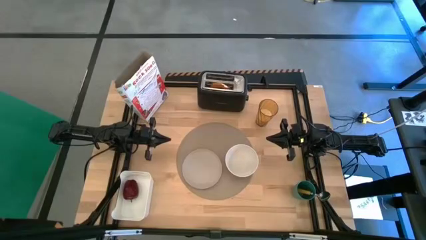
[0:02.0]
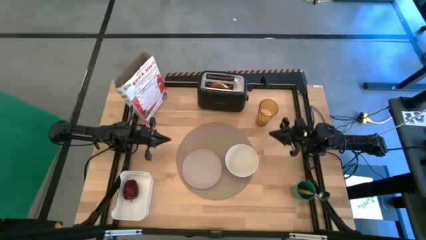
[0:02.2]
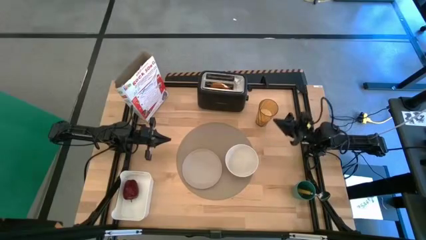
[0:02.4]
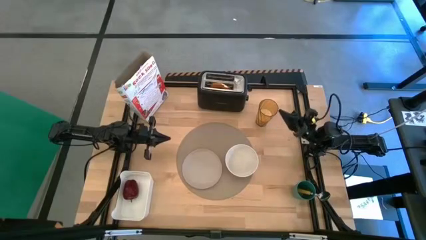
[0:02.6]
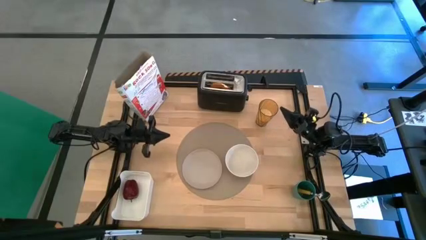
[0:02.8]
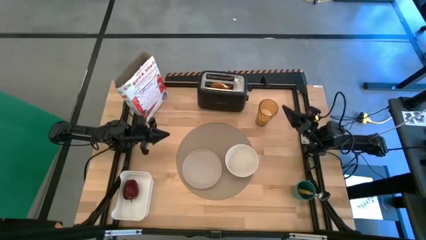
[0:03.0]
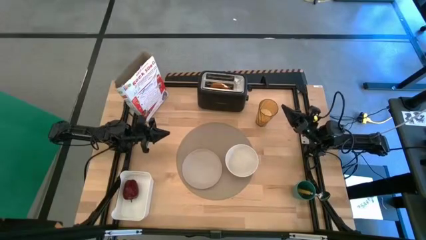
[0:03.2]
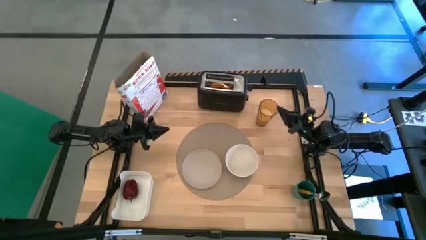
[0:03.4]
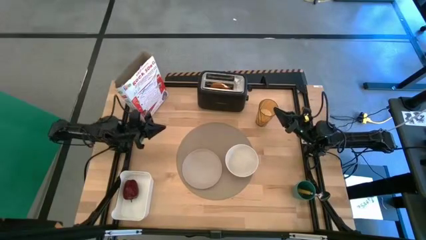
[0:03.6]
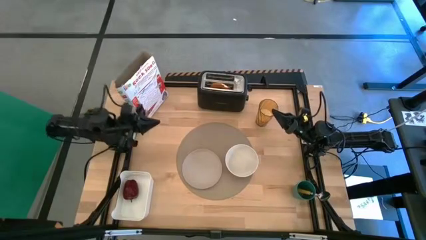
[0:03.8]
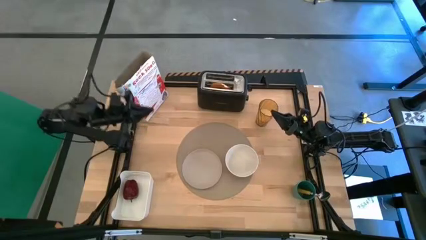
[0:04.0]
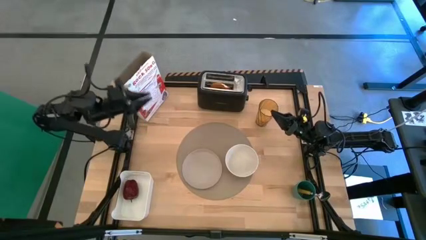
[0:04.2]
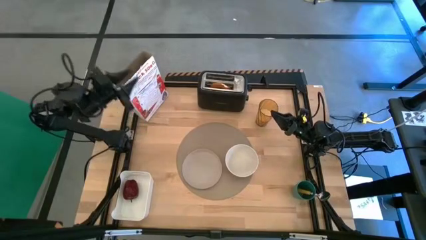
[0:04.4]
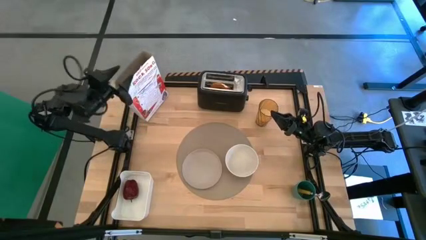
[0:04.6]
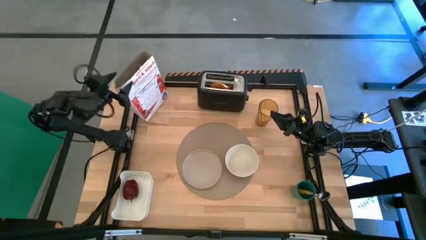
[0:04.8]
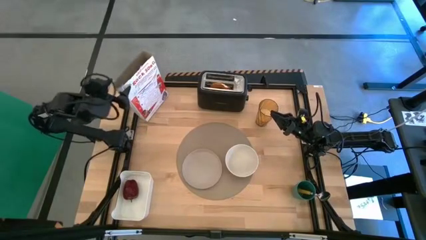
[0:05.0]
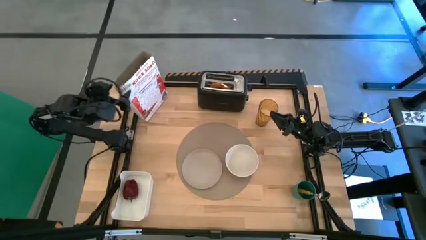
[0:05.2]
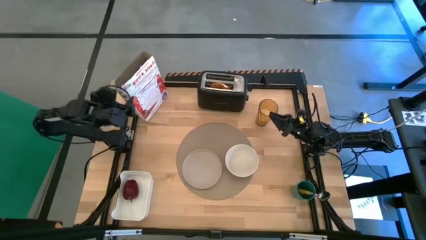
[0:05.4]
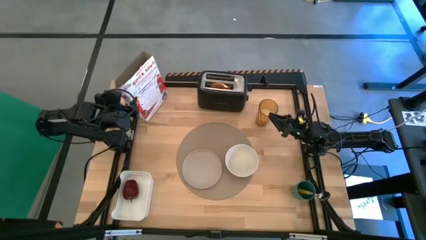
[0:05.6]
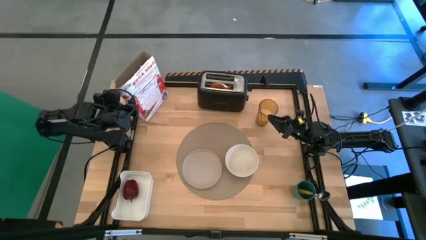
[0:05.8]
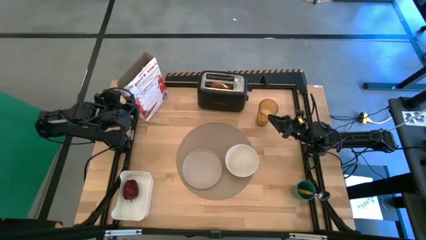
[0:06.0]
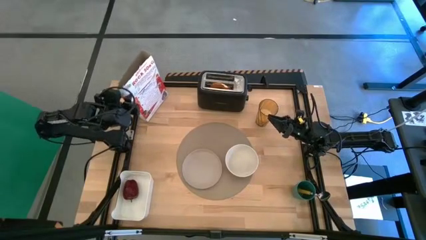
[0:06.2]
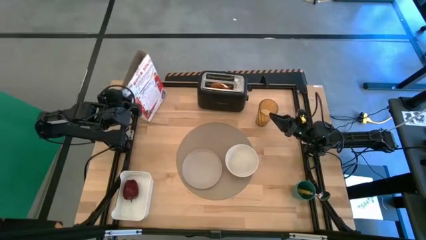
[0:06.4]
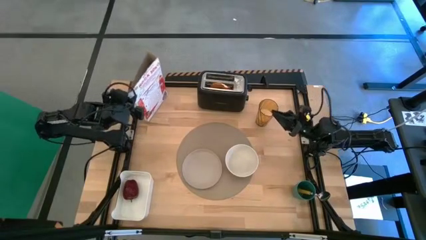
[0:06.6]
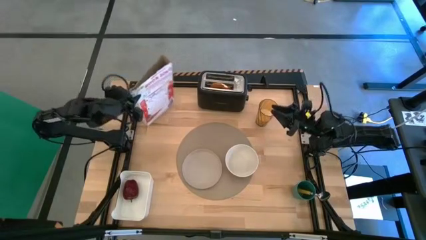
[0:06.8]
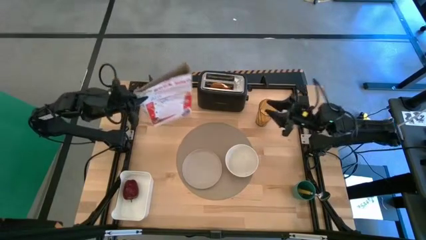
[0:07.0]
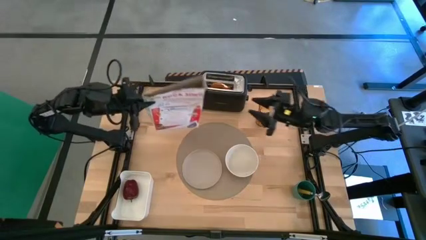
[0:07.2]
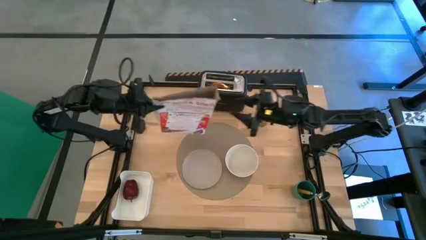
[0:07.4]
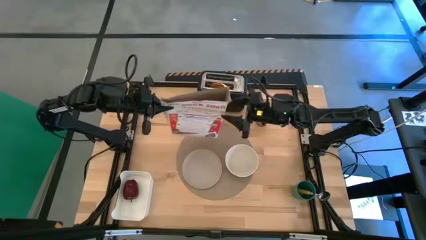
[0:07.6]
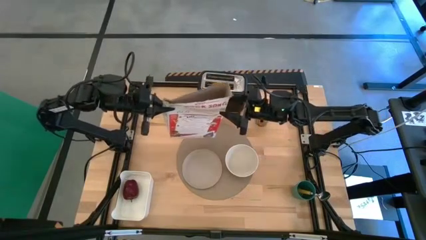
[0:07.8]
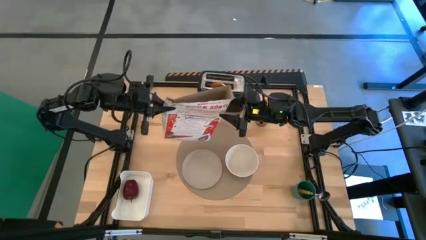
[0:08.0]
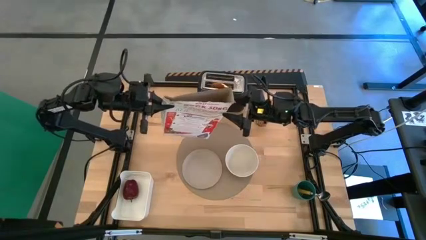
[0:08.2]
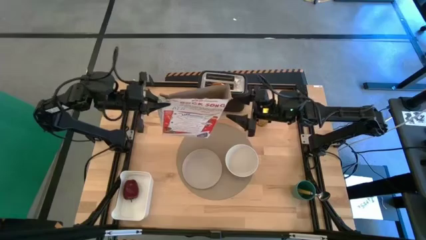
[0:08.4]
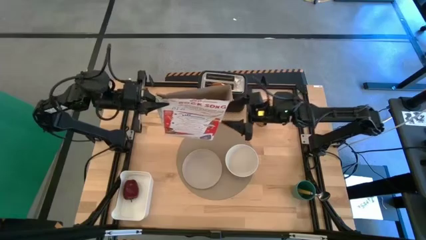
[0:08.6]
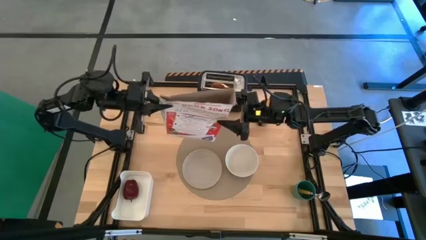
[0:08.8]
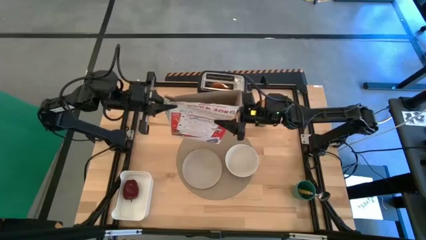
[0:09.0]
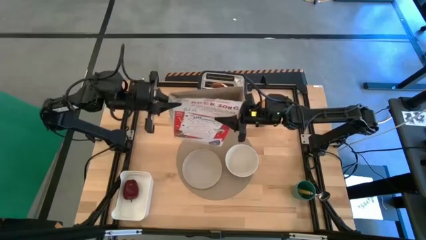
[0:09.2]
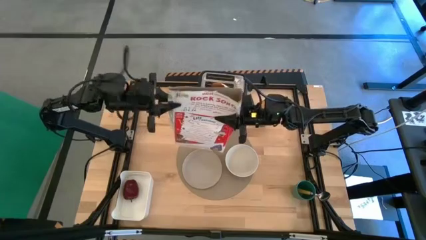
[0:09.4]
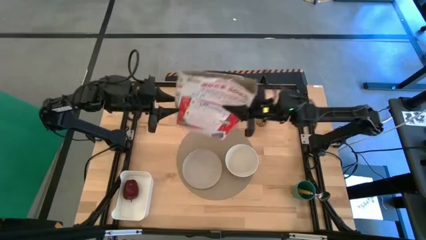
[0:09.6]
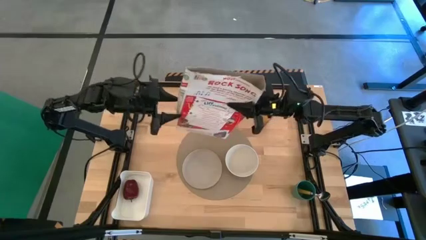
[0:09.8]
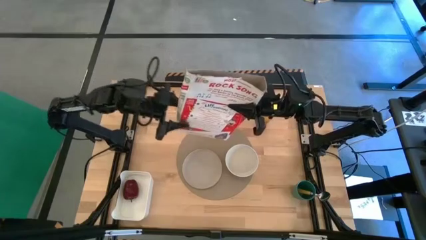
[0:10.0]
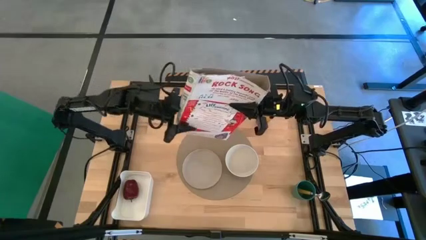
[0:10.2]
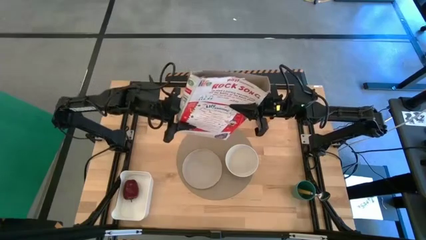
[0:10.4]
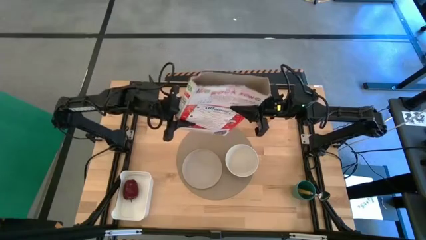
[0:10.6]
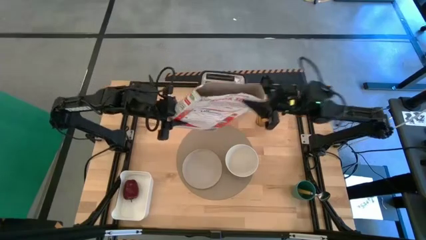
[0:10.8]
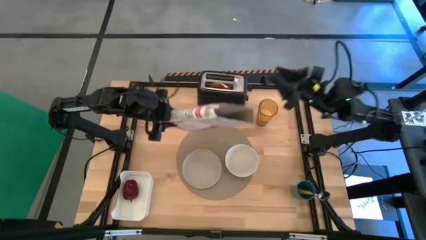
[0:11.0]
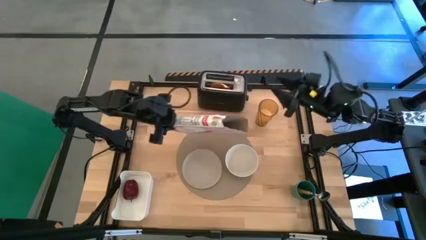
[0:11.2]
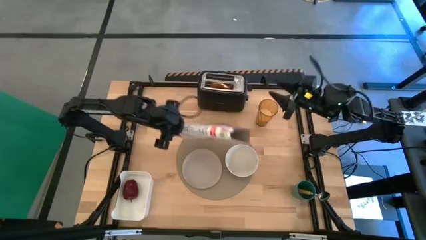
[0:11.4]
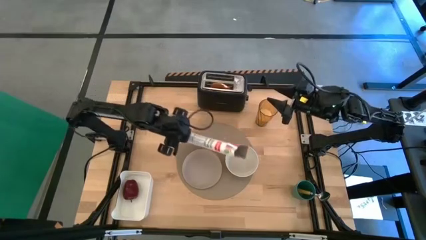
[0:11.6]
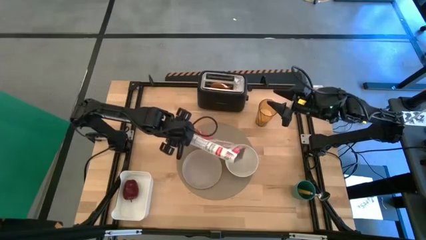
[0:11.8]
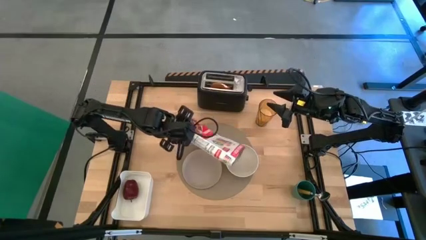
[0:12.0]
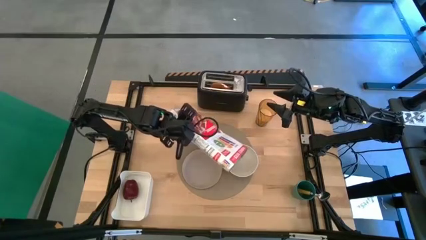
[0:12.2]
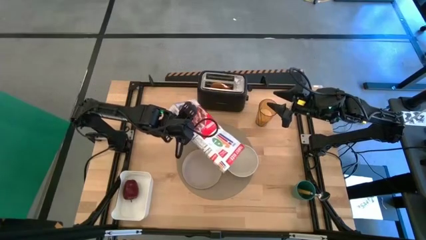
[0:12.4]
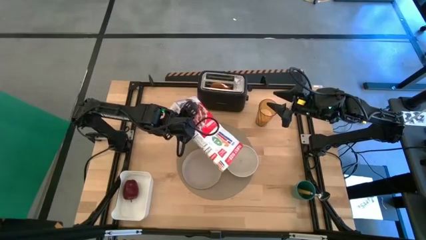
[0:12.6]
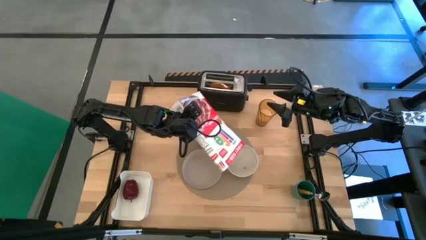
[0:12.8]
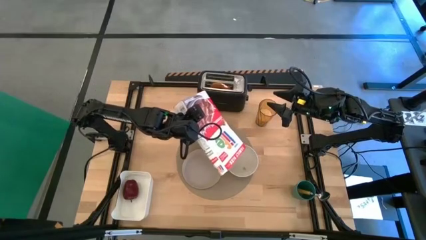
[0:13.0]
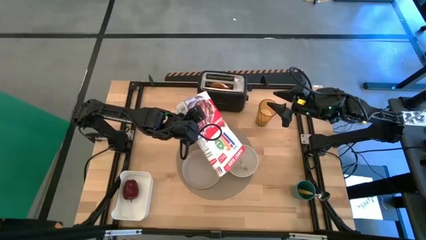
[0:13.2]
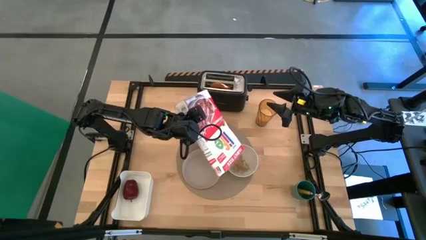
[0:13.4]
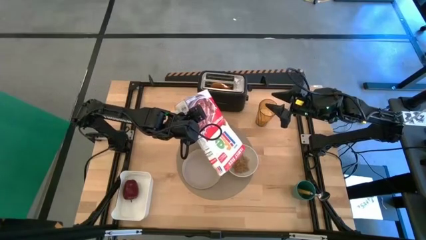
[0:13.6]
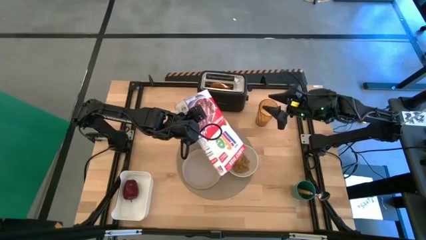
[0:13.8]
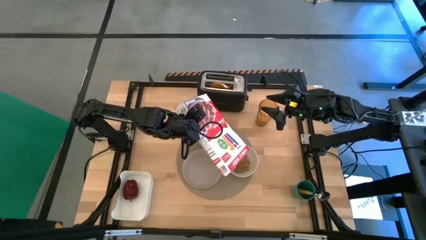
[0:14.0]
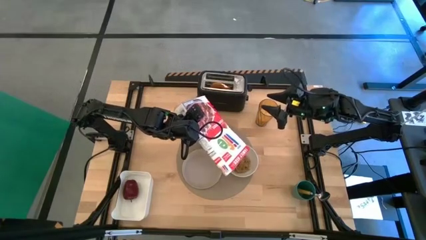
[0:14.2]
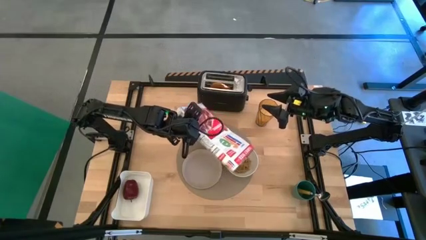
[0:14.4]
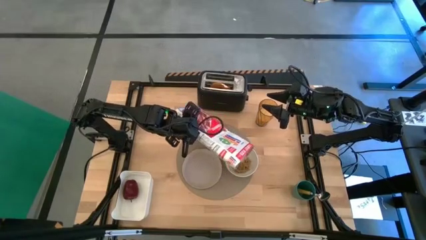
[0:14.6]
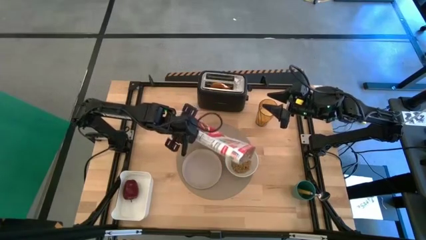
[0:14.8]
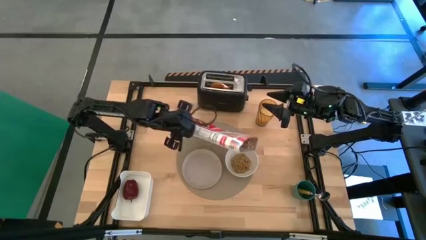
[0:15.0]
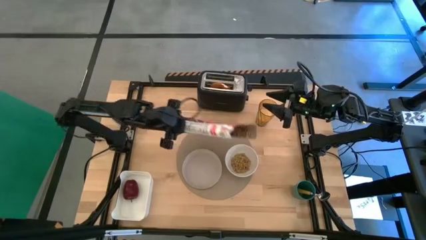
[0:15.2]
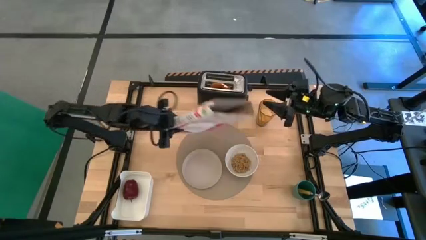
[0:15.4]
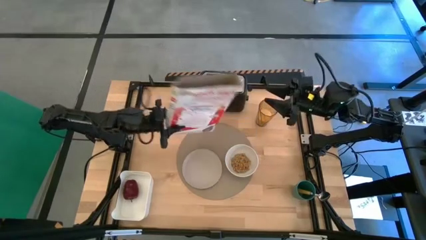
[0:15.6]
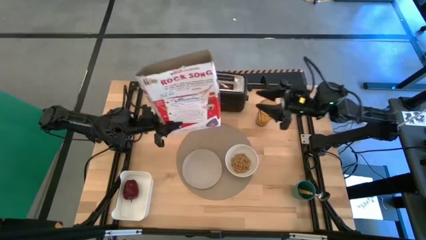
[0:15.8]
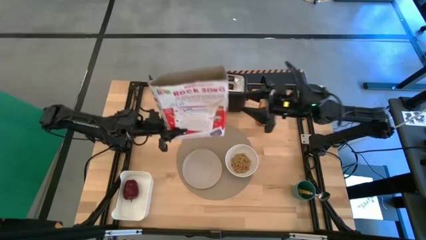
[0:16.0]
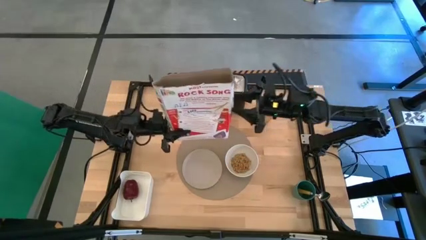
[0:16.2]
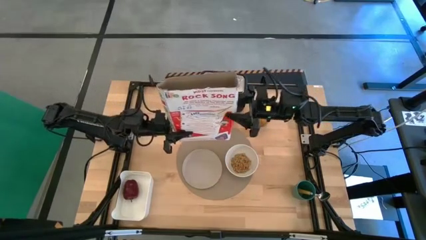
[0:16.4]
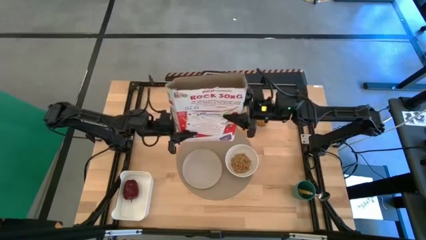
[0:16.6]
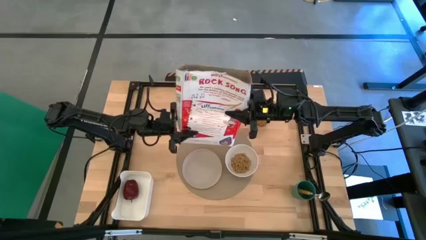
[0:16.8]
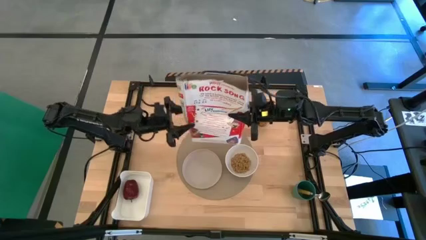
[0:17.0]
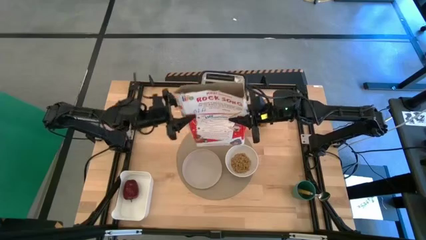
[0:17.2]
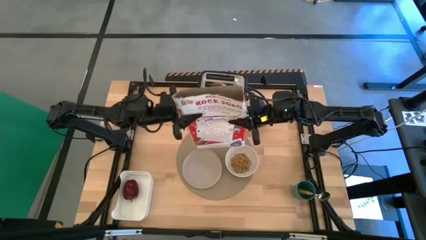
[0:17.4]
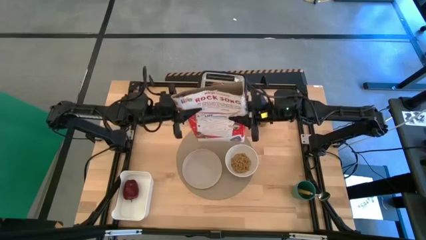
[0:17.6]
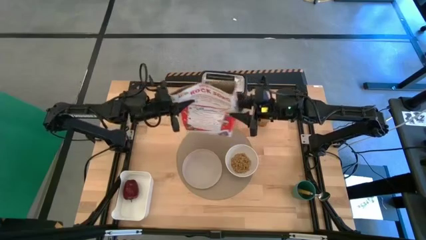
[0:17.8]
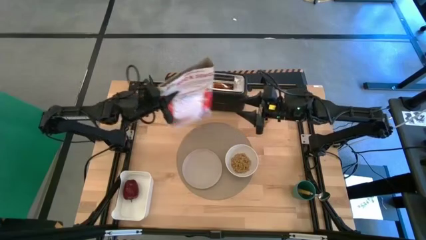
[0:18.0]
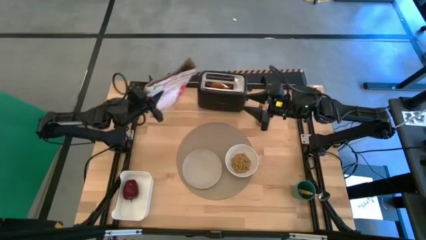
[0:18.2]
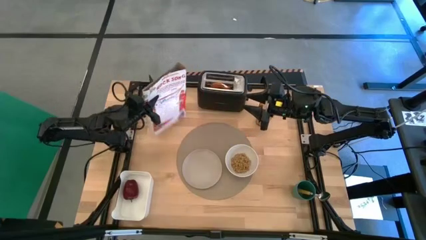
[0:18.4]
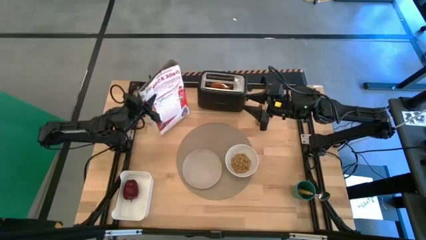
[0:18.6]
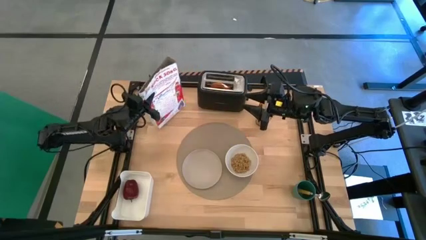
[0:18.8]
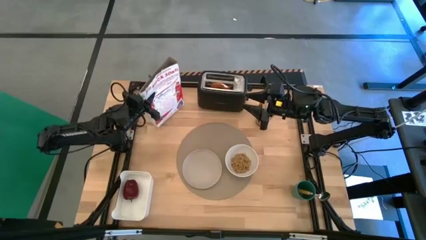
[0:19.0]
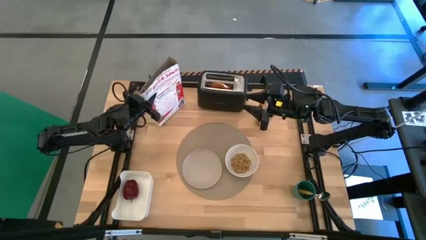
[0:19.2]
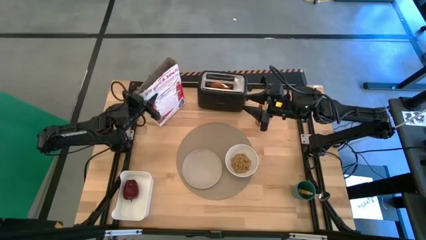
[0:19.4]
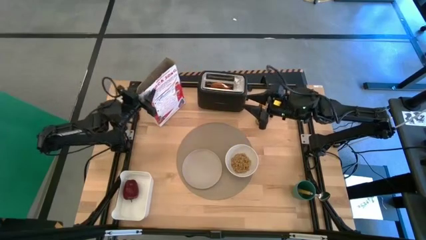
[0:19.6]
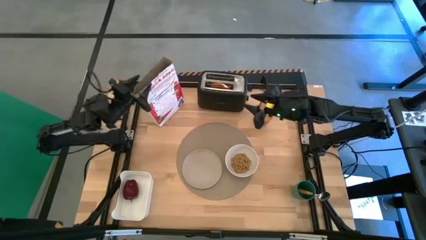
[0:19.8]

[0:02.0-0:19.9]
Task: Arrange a breakfast setting
Pour the cereal from the cereal box into the white bowl
